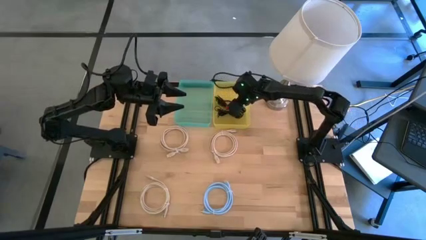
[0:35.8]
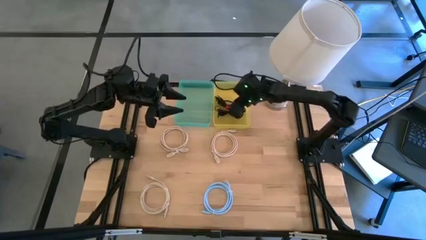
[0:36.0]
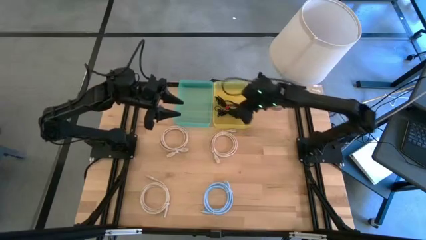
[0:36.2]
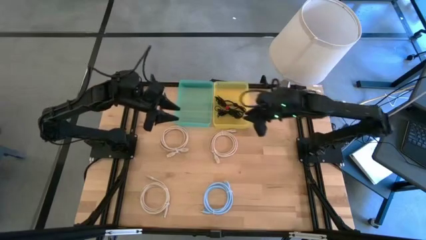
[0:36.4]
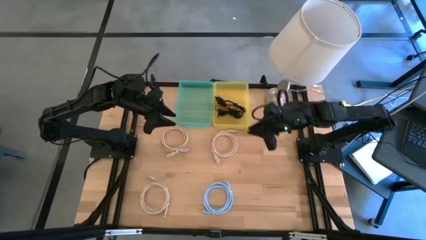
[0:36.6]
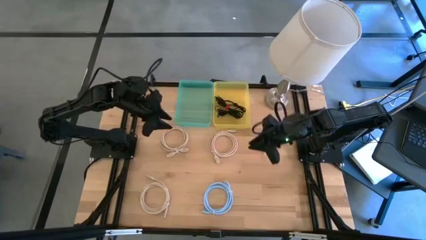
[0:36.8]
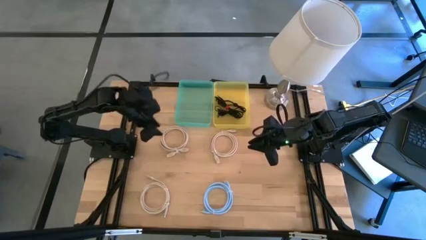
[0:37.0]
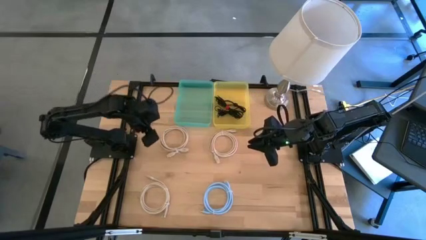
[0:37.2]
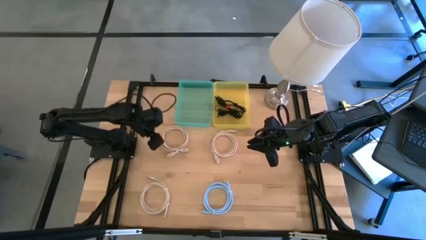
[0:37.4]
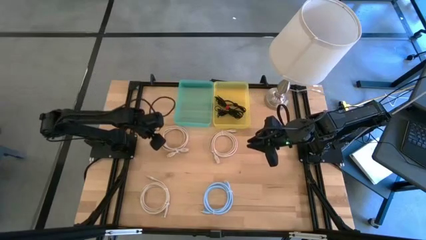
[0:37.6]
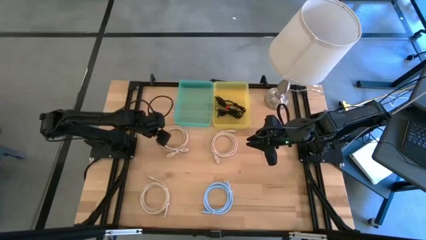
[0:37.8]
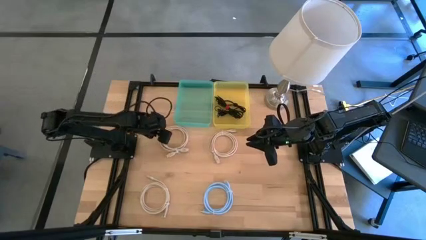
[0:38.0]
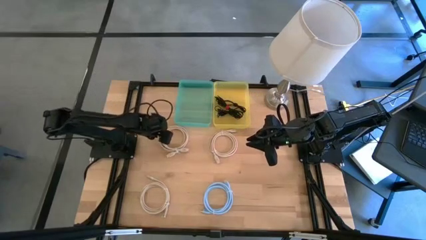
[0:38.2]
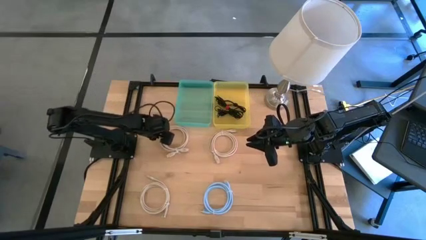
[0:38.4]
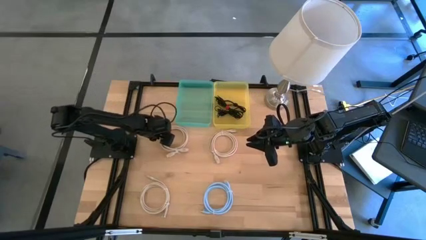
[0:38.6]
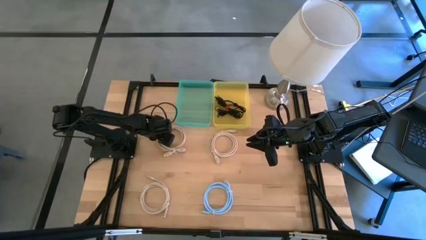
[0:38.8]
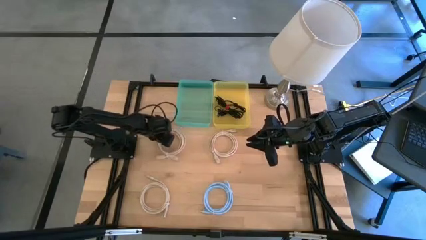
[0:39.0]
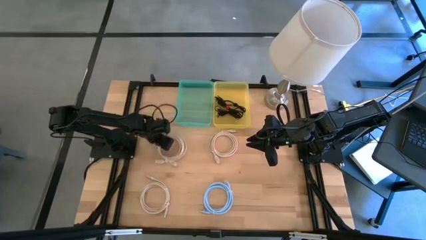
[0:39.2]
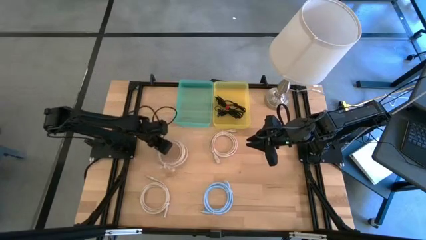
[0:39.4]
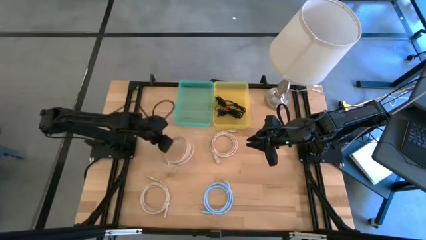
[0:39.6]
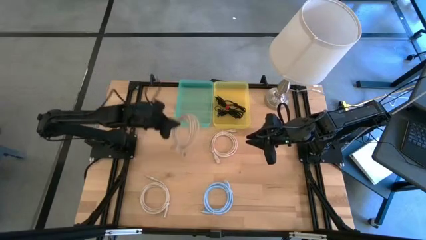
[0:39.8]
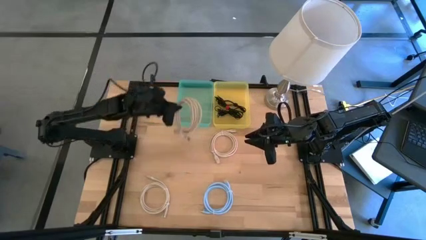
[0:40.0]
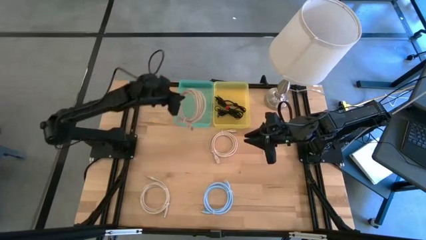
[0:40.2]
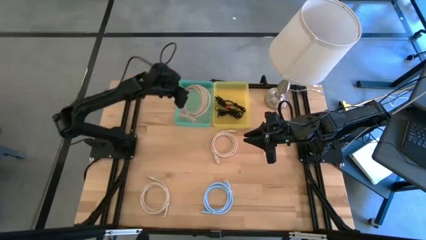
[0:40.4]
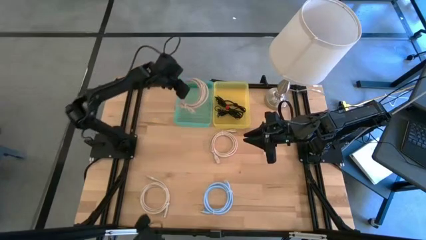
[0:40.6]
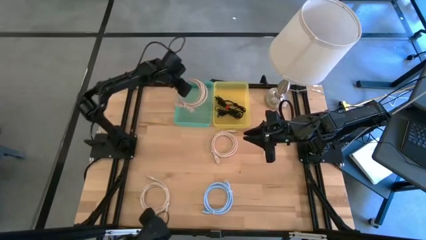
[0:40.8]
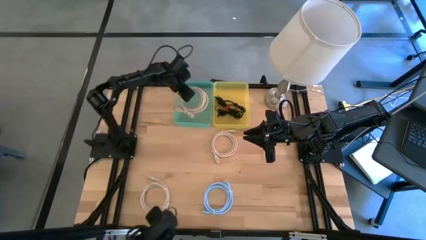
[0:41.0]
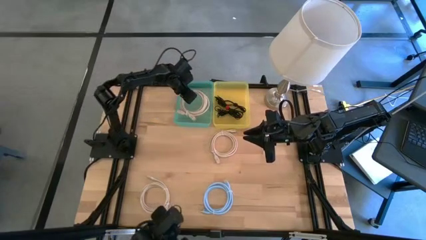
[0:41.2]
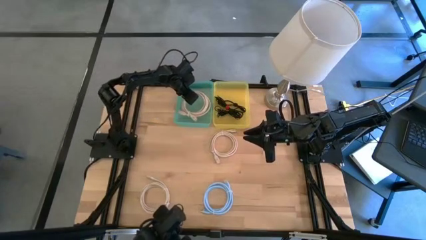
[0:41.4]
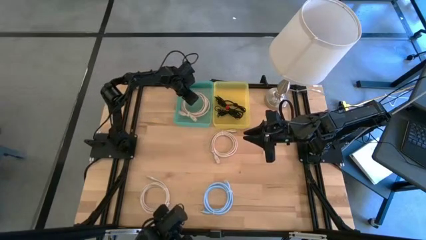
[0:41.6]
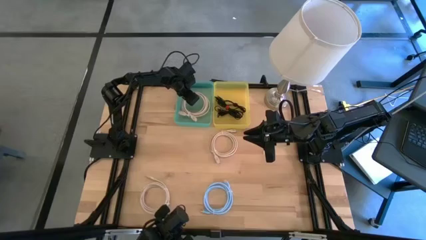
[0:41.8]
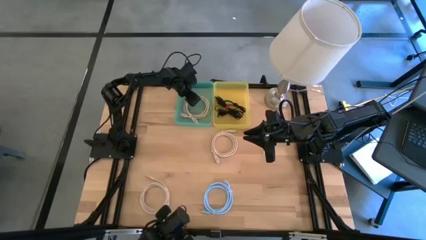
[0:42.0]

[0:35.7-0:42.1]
Put the top left brown HDMI cable into the green bin

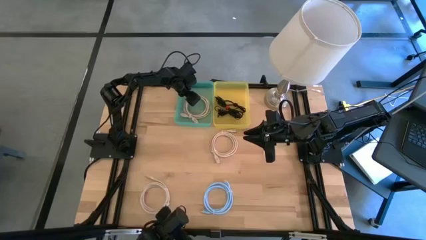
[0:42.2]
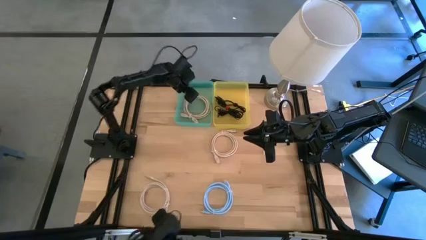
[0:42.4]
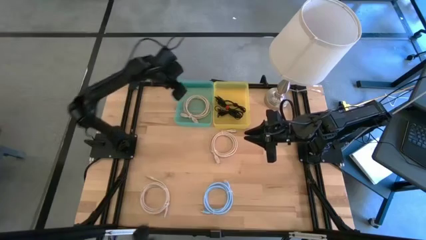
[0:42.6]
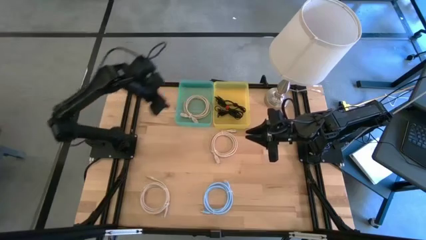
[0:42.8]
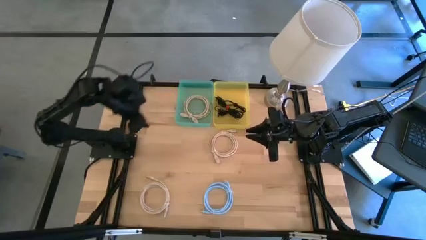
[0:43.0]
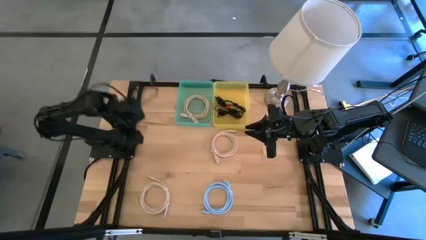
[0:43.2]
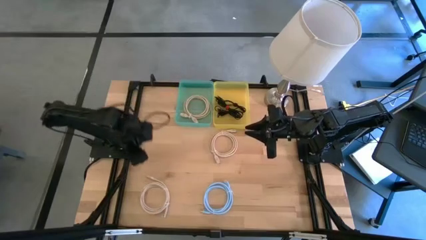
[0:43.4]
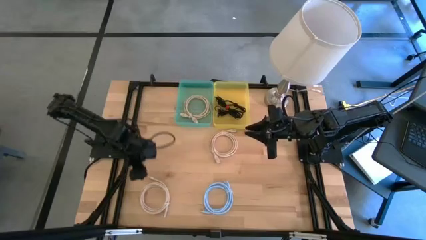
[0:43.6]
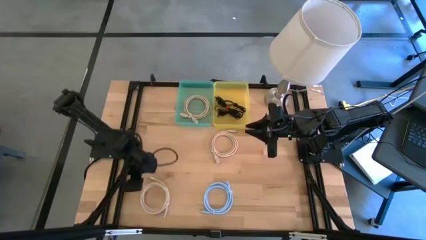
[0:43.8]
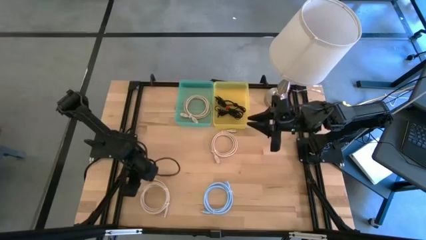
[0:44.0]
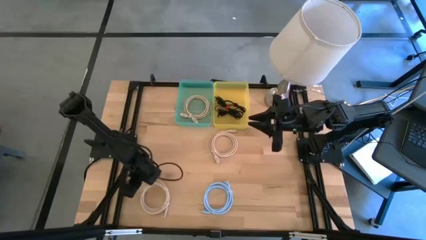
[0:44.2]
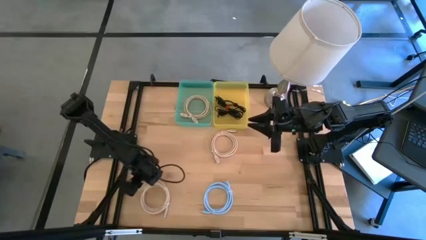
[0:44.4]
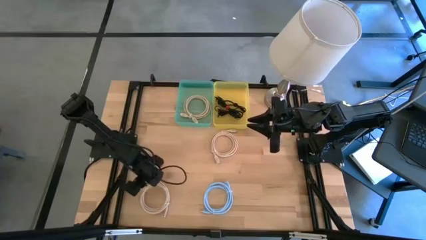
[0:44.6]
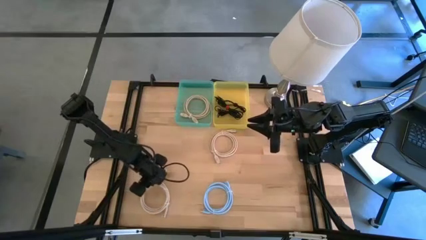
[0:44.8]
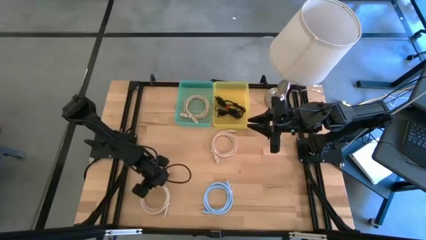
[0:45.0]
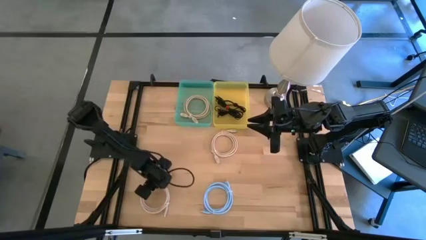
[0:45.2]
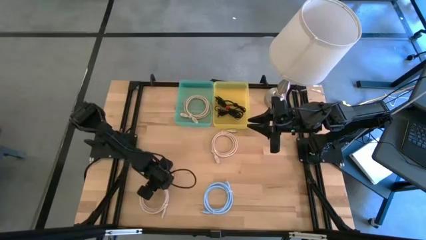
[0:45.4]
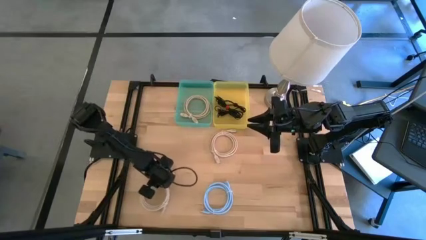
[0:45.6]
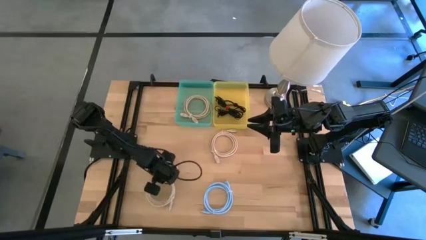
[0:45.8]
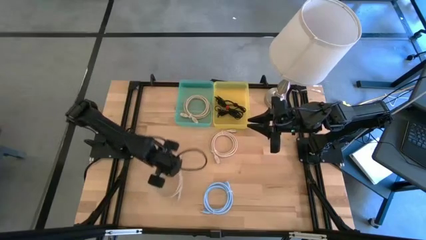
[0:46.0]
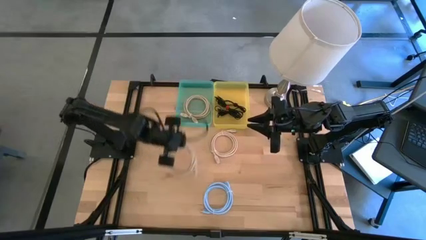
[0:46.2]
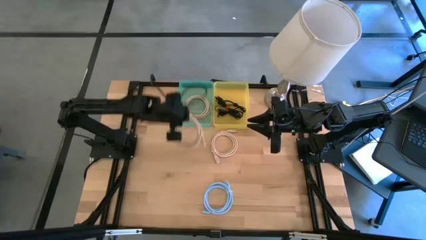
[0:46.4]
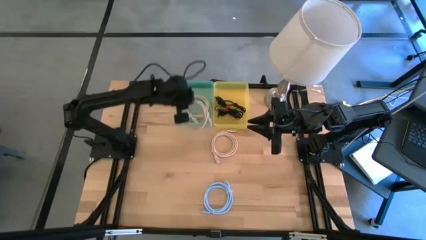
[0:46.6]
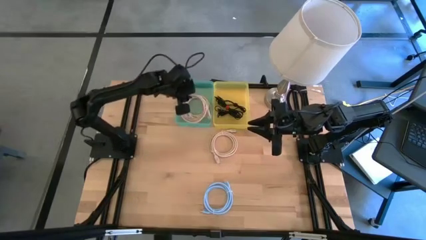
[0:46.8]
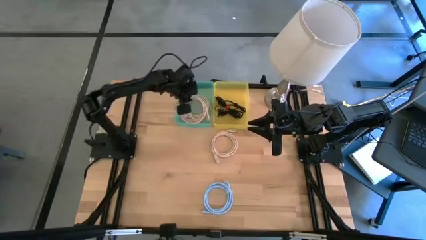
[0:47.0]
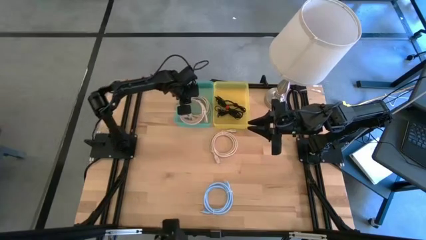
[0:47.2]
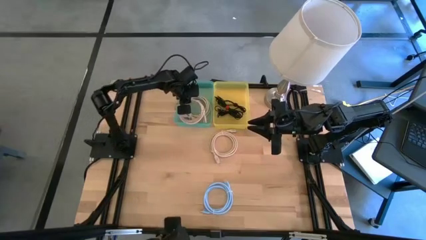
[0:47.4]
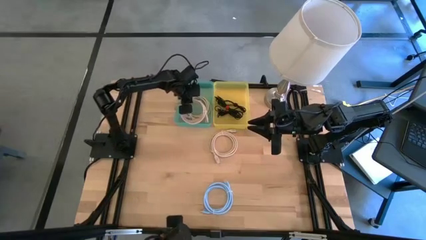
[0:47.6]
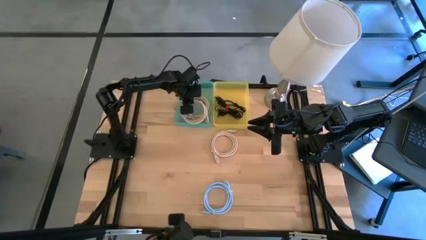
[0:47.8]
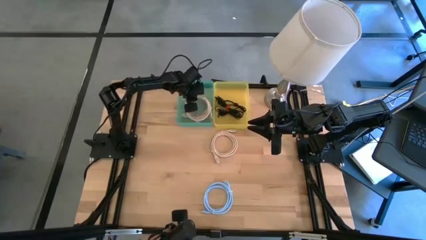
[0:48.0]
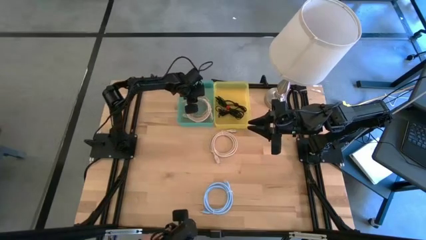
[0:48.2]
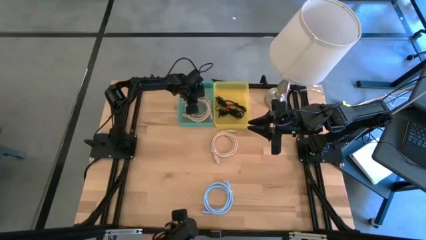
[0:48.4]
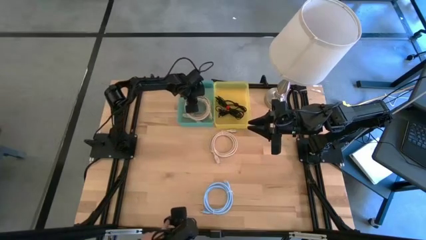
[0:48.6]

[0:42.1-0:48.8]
Put the bottom brown HDMI cable into the green bin

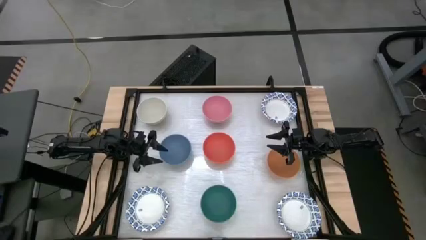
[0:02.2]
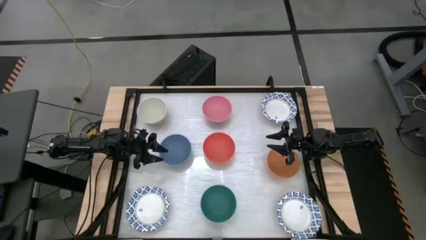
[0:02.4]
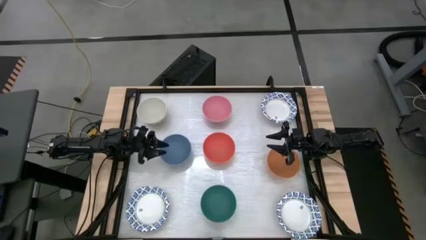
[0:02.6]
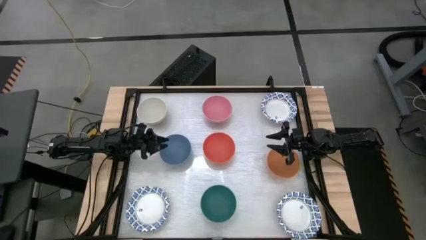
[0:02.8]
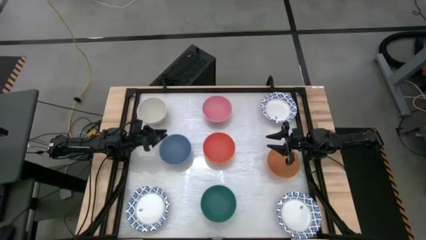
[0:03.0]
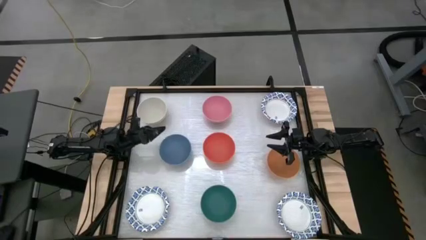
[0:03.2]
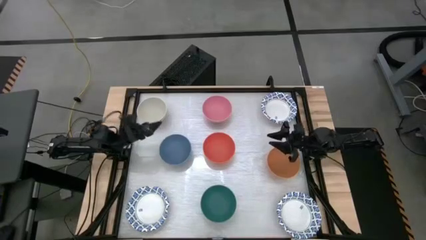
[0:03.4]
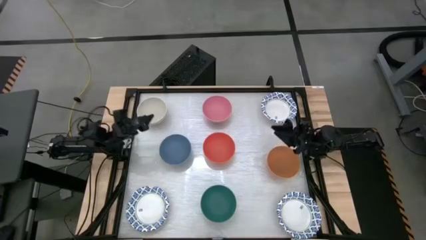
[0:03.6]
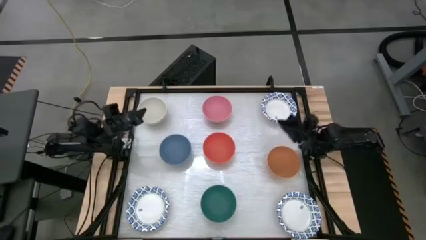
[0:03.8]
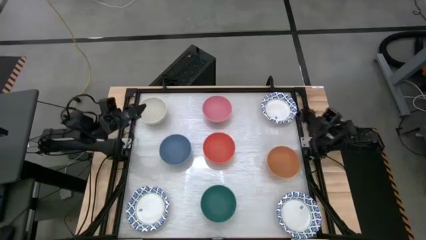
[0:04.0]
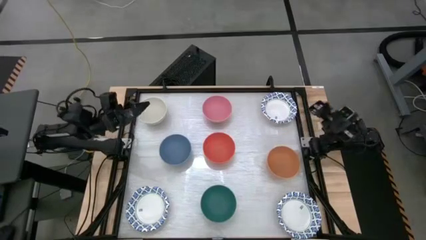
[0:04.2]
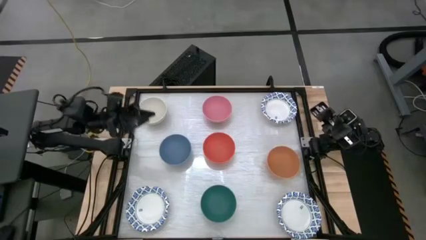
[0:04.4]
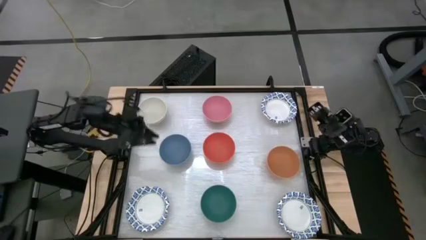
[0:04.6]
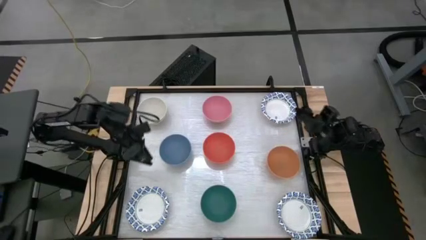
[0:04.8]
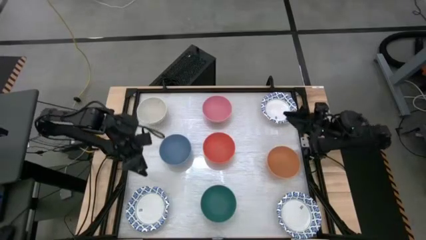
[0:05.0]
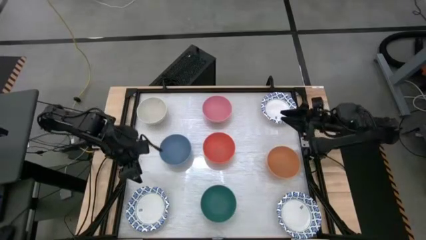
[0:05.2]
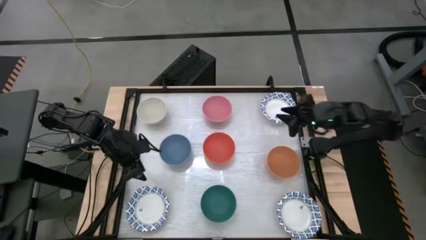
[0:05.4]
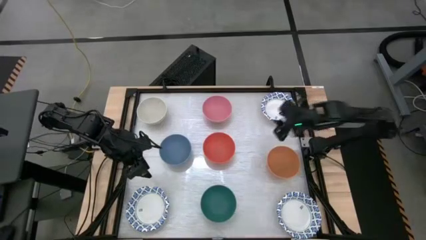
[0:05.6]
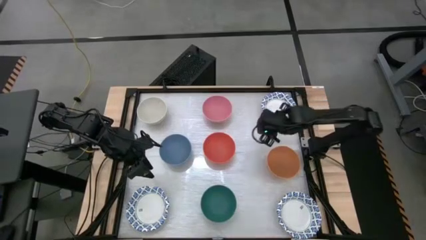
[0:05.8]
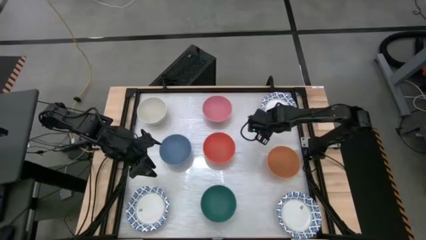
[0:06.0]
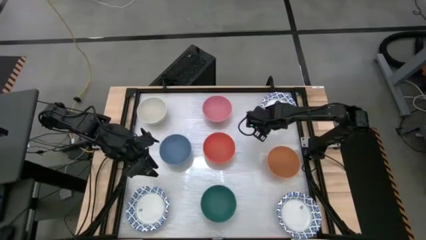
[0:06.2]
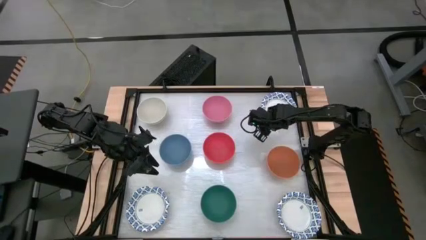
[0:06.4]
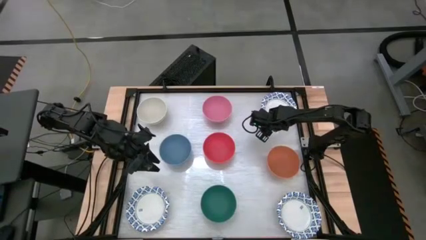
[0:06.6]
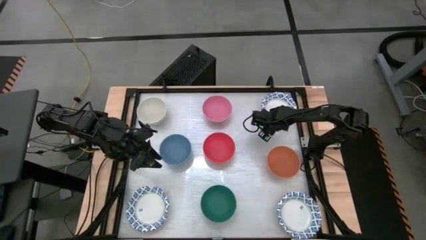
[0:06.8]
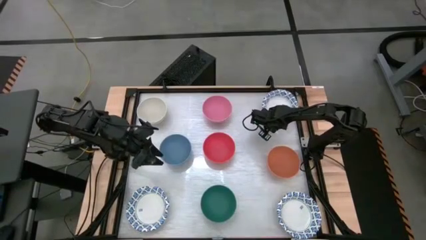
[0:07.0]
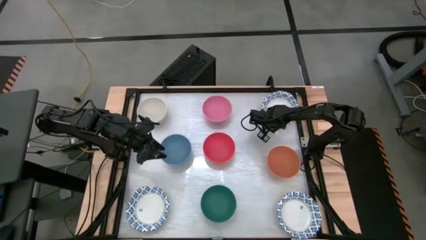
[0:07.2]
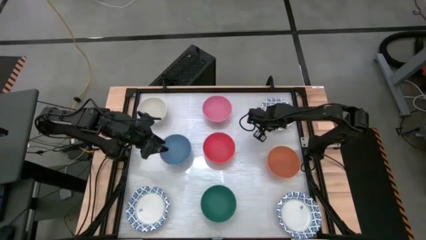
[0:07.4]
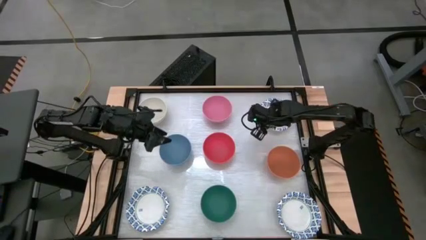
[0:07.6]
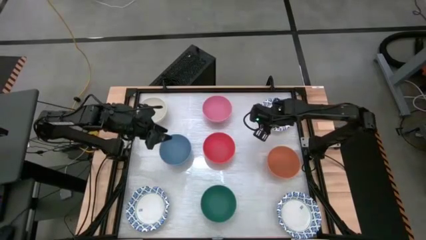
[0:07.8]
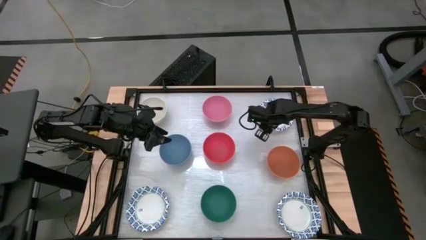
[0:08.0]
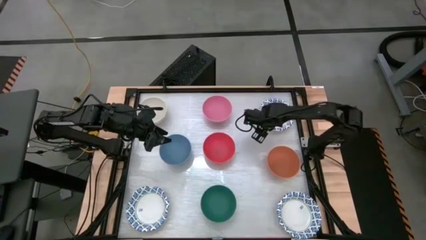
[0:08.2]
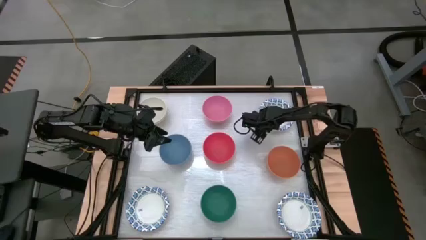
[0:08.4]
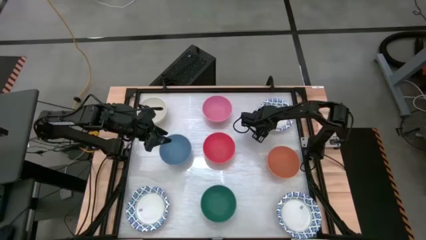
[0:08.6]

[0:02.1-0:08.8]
Stack the top right white patterned bowl on top of the left white patterned bowl
